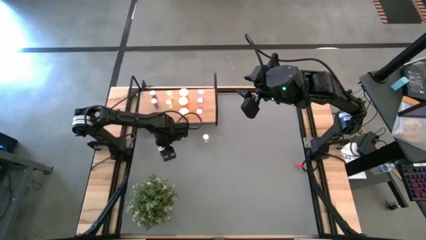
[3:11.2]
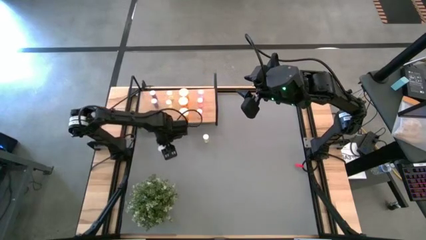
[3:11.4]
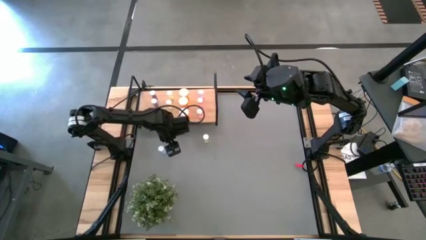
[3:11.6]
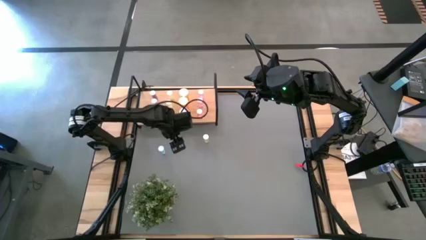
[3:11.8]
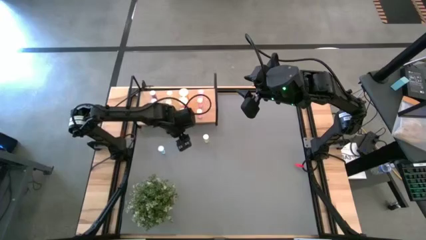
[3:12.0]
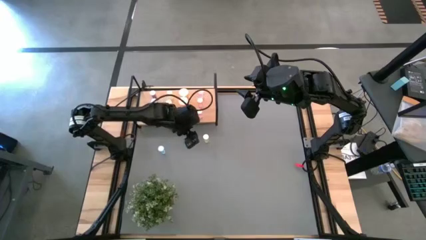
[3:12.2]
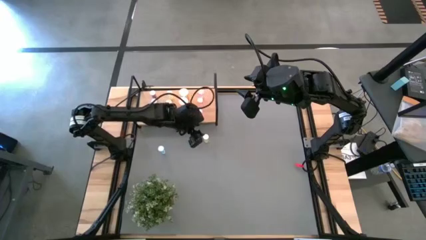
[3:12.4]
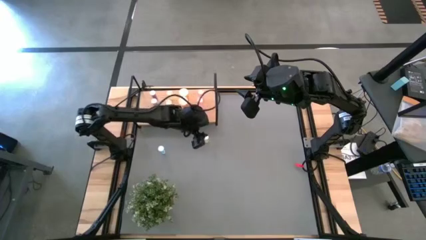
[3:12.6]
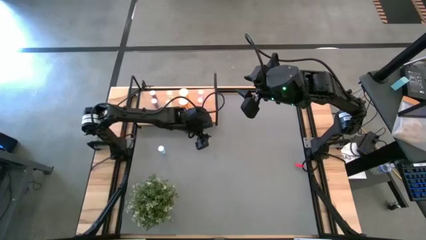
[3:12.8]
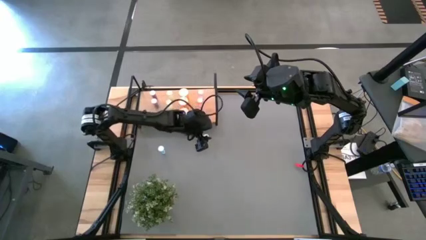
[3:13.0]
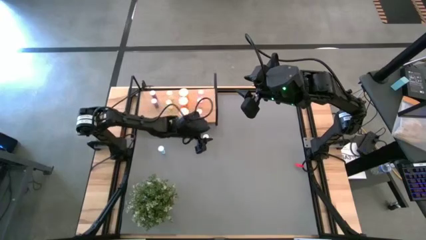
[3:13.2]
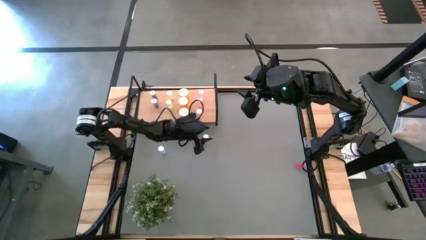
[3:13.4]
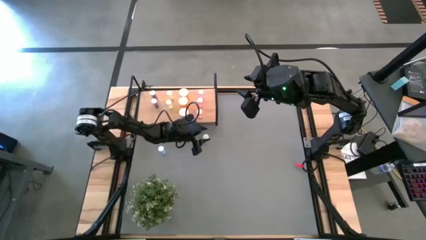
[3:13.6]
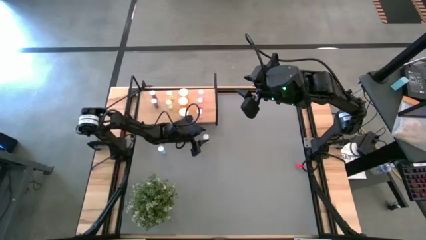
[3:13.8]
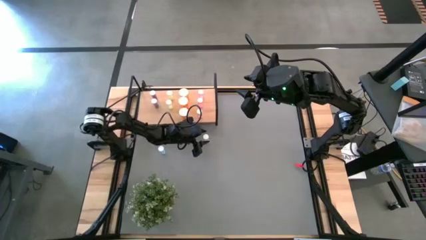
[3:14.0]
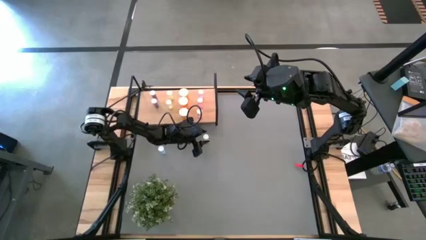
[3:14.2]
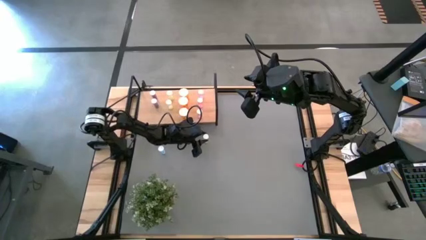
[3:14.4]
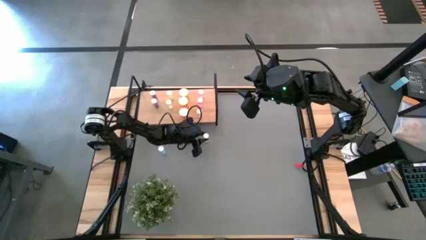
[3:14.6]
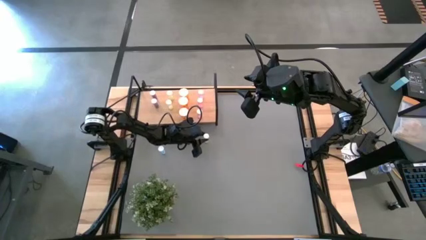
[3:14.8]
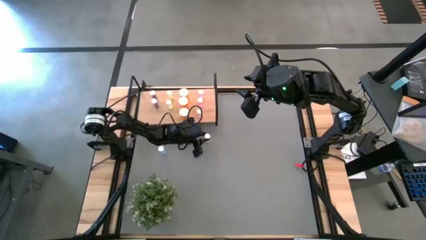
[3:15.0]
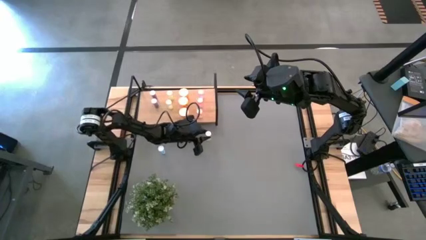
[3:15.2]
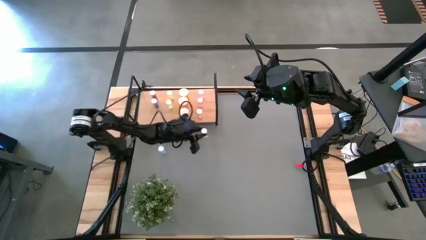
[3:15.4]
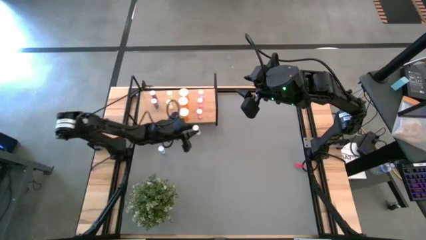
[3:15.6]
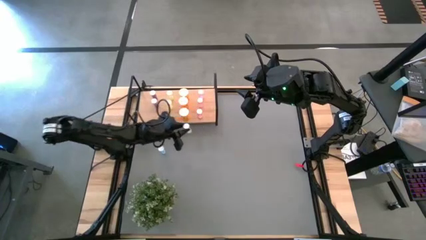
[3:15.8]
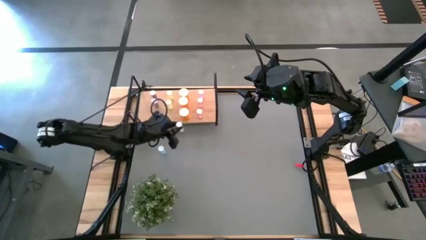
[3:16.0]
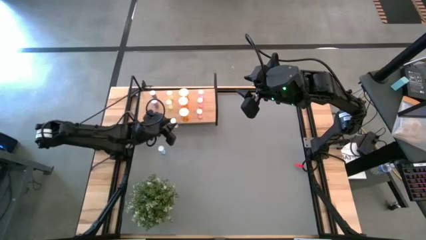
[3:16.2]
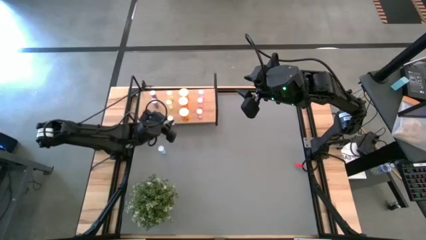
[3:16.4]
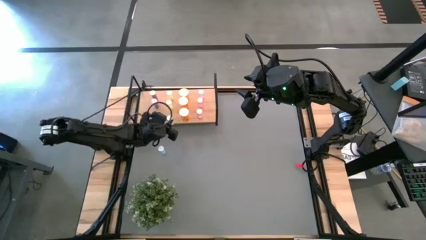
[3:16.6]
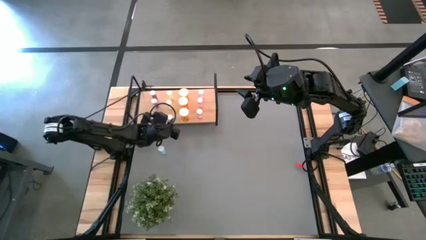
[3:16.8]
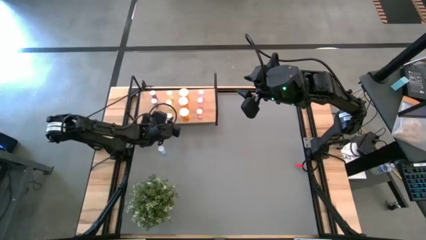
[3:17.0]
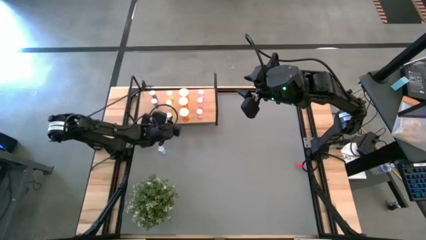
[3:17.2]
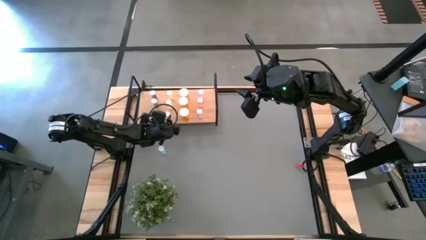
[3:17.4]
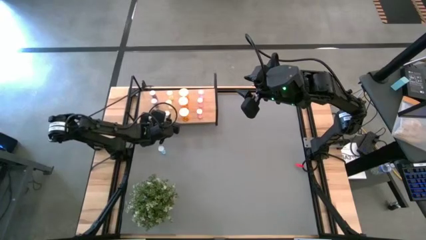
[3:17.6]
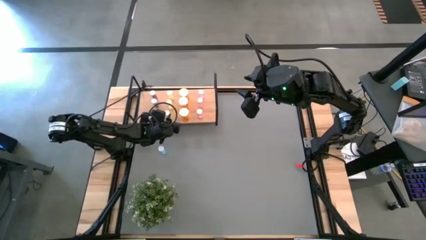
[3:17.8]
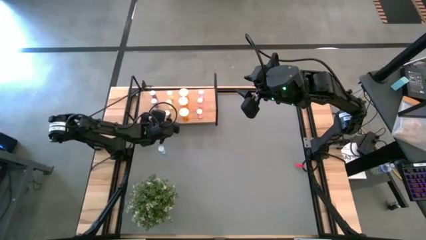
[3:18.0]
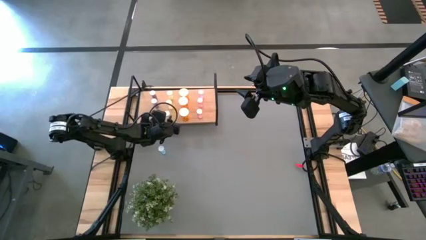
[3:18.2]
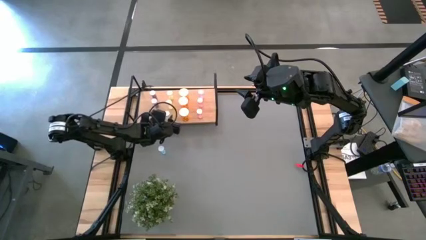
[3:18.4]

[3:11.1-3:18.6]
Task: Pick and place medicine bottles onto shelf by color
Put the yellow pill bottle on the shelf

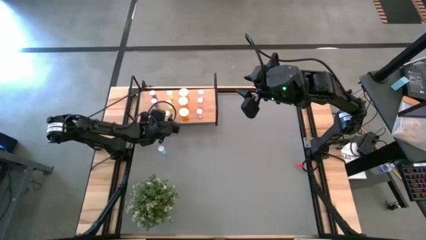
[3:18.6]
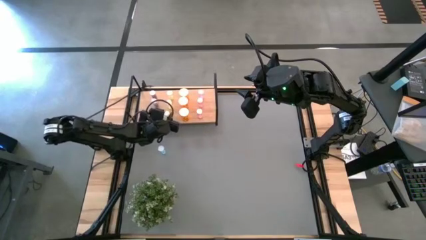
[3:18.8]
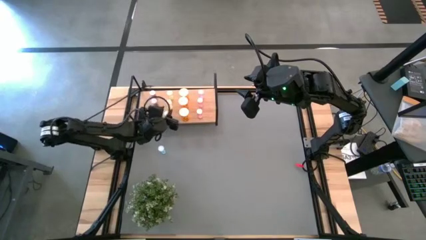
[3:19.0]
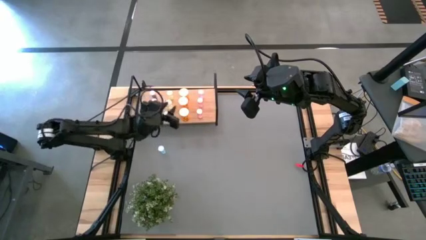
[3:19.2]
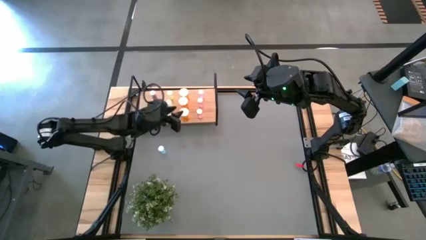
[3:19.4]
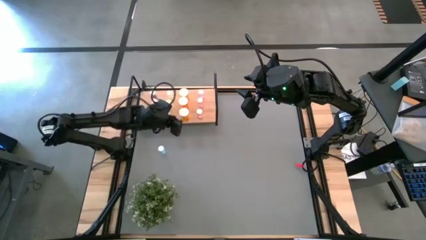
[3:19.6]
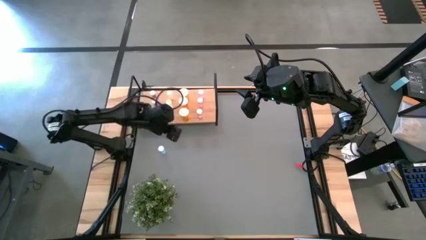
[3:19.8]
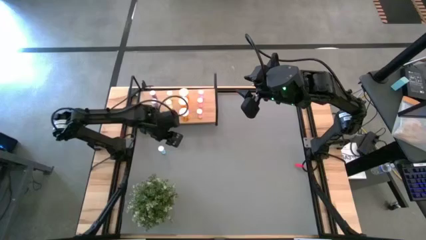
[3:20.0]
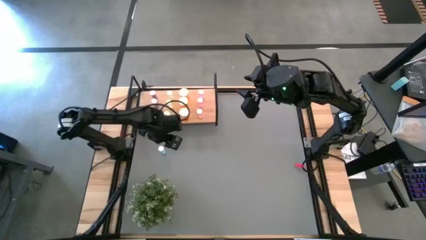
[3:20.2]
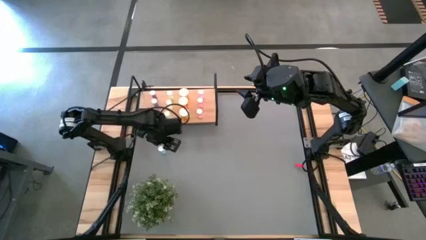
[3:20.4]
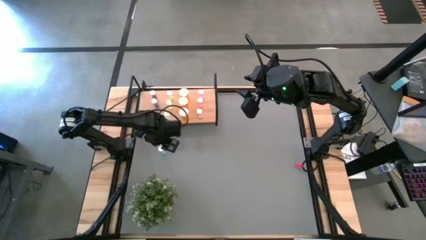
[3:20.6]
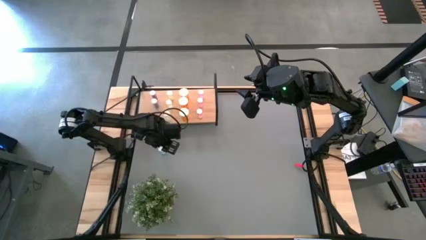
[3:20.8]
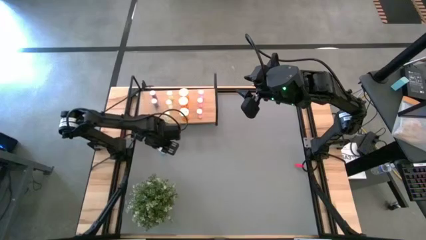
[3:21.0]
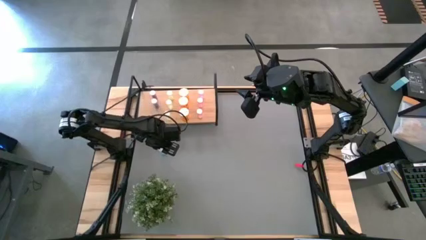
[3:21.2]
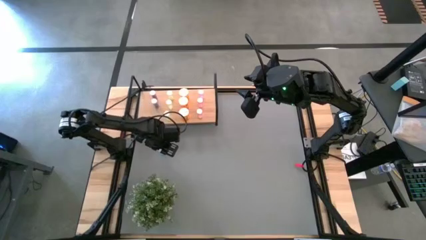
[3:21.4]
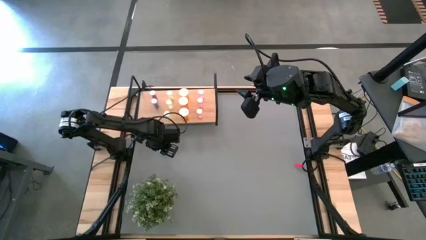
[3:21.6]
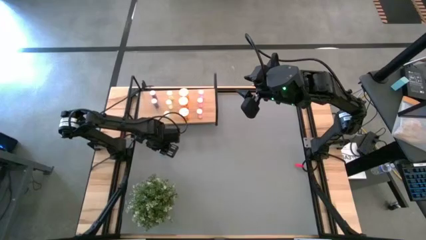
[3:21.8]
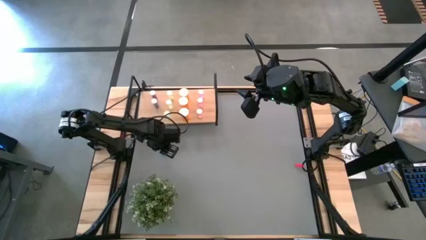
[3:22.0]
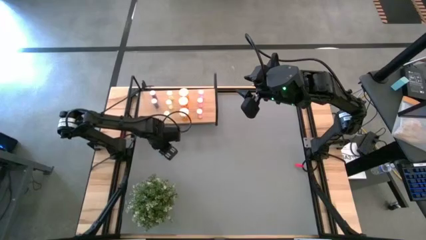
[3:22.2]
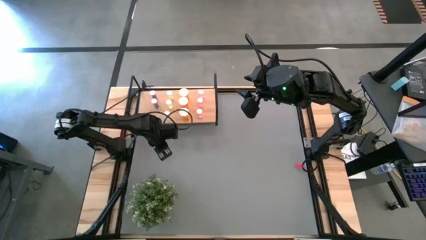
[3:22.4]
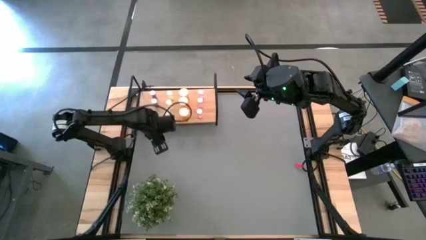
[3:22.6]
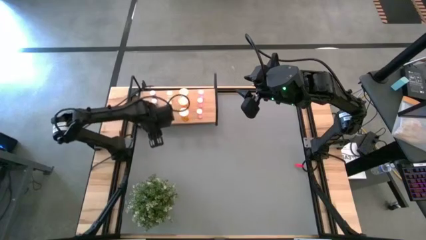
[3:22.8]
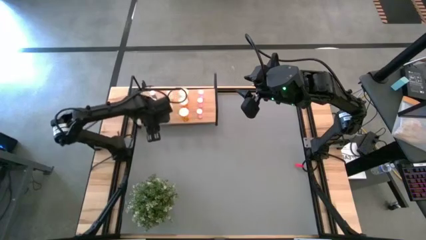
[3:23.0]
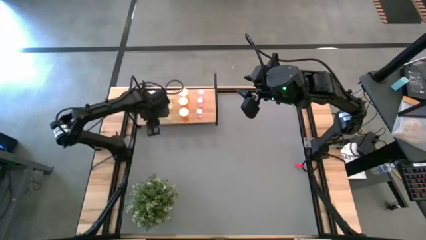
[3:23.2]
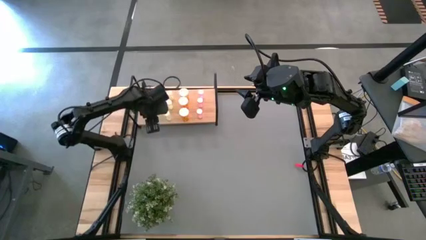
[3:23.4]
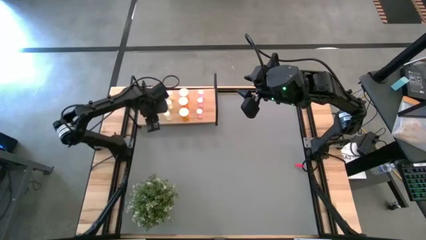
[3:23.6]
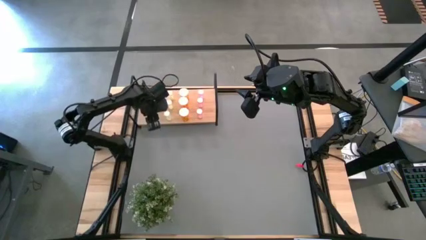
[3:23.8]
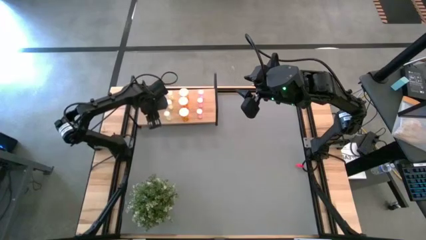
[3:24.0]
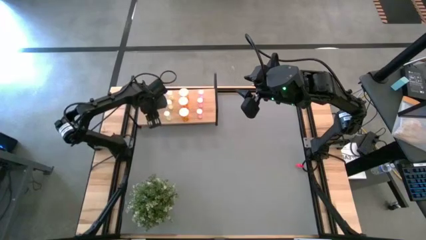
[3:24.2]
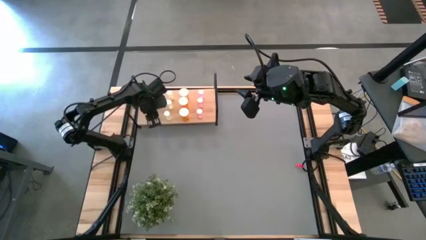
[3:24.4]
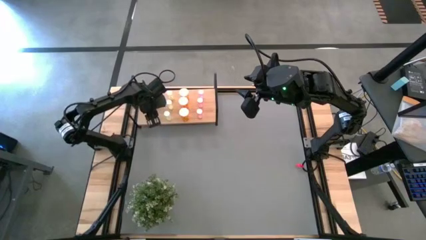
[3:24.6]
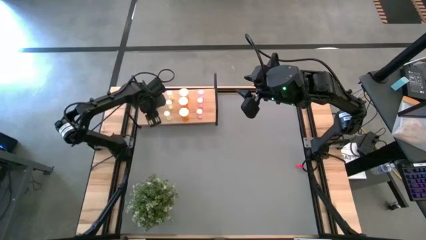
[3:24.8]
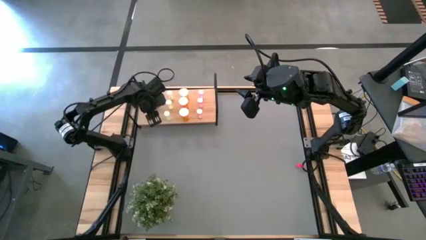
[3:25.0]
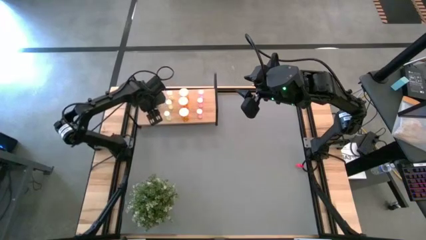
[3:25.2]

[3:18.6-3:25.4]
Put the blue pill bottle on the shelf
